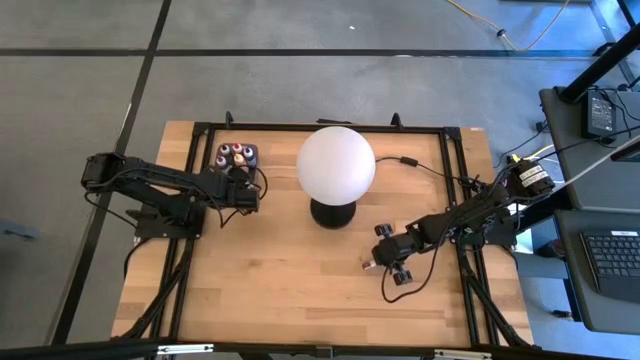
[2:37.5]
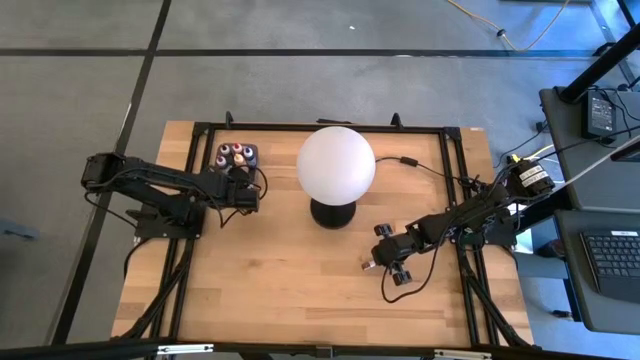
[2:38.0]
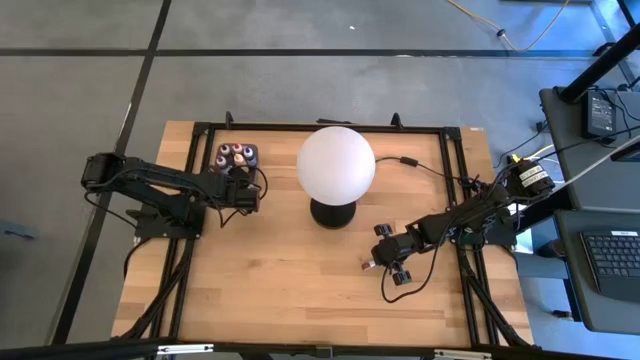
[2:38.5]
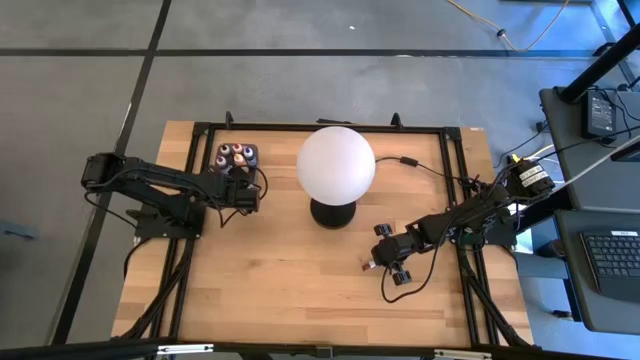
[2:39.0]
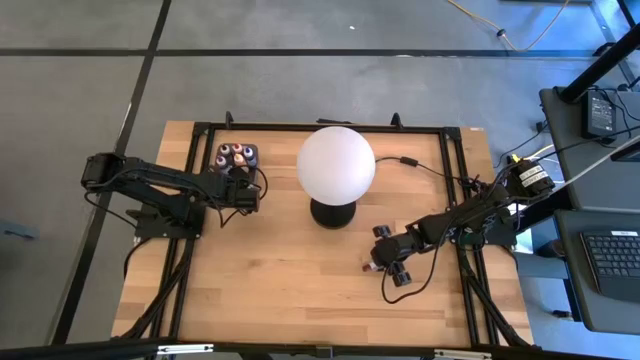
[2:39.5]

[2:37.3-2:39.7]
Task: Pick & Place food coloring
Put the small red food coloring bottle into the black container

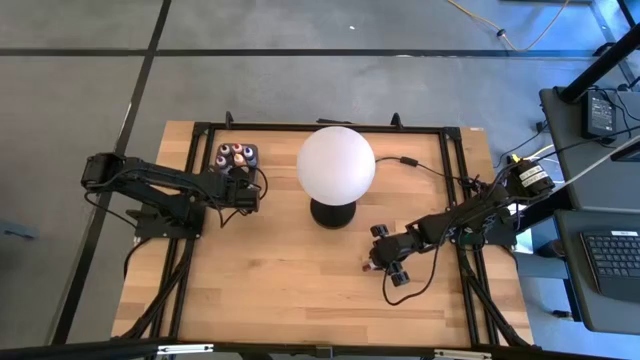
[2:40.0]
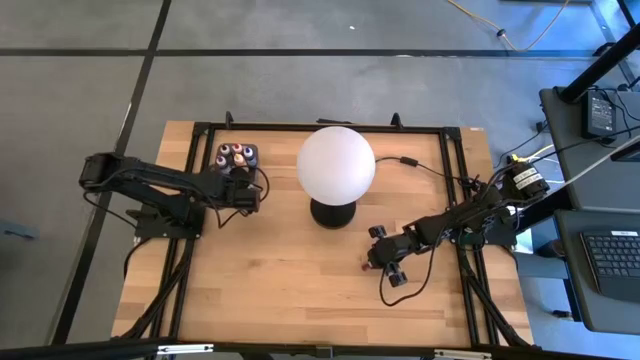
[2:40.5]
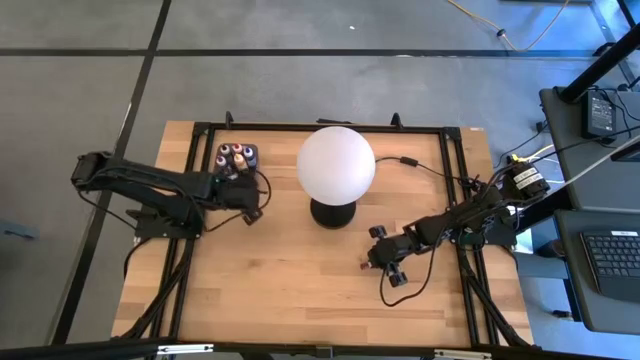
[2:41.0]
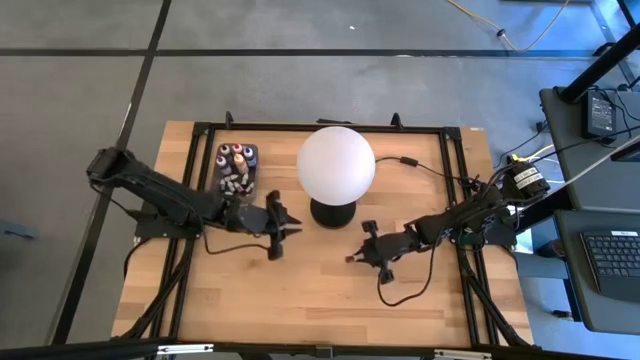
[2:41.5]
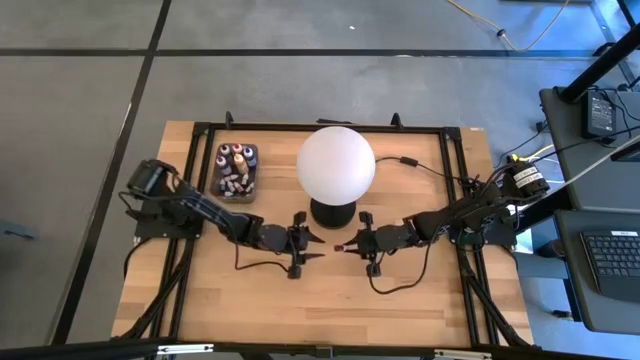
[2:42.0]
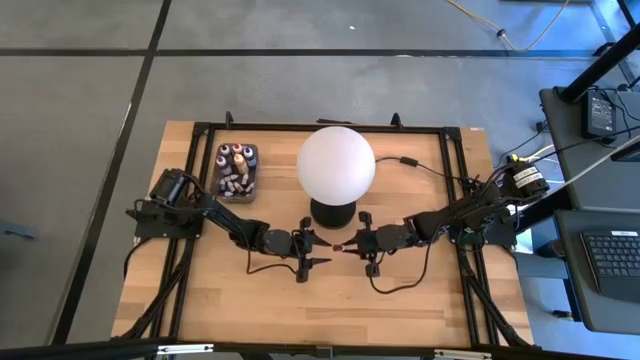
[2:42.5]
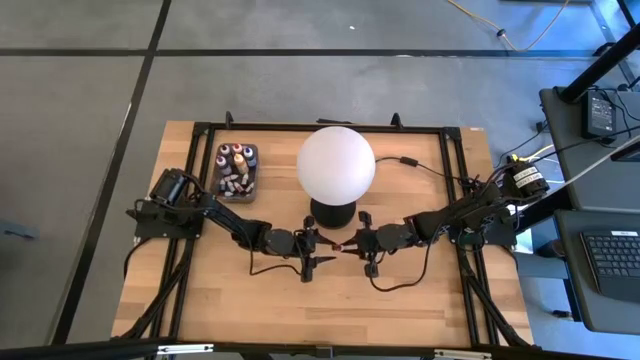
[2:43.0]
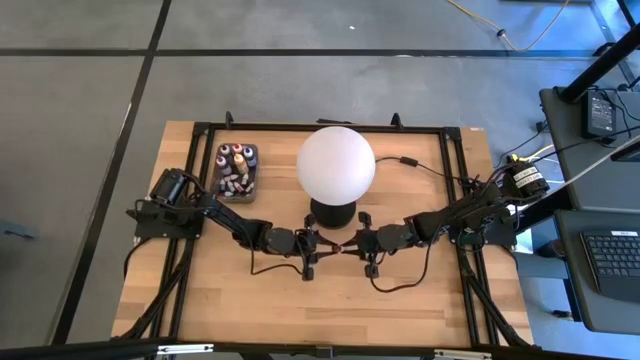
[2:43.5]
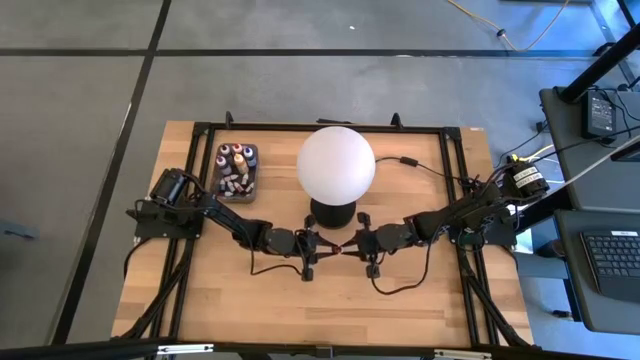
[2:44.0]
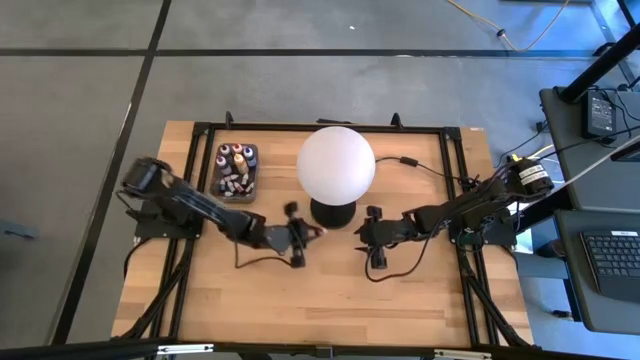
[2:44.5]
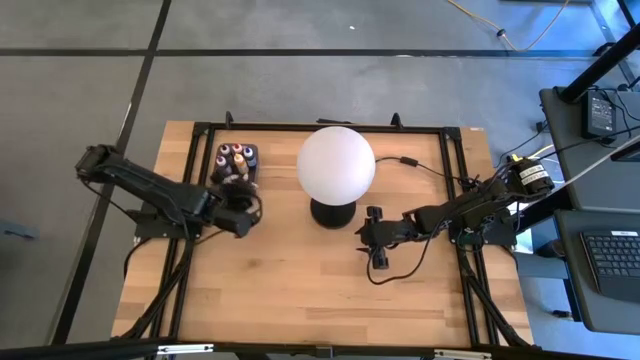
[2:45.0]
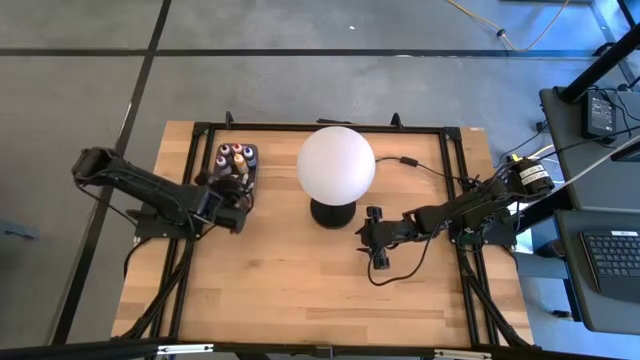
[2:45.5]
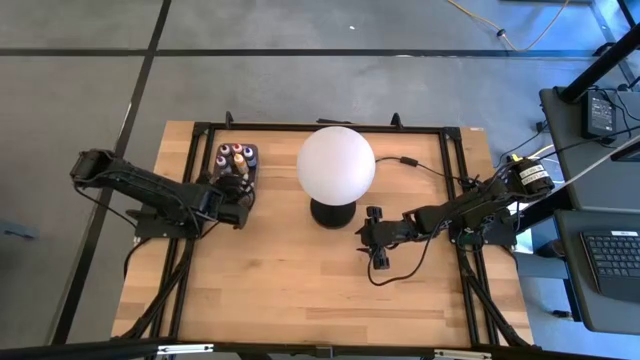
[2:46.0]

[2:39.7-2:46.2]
Put the small red food coloring bottle into the black container

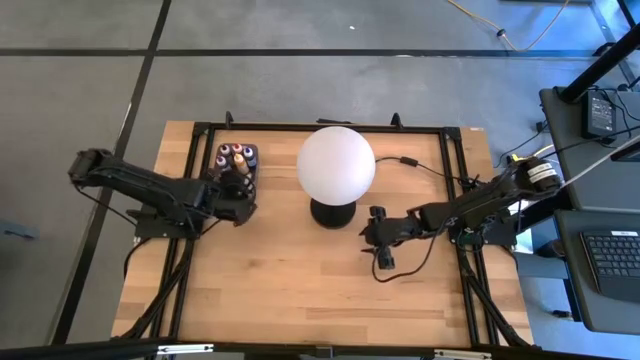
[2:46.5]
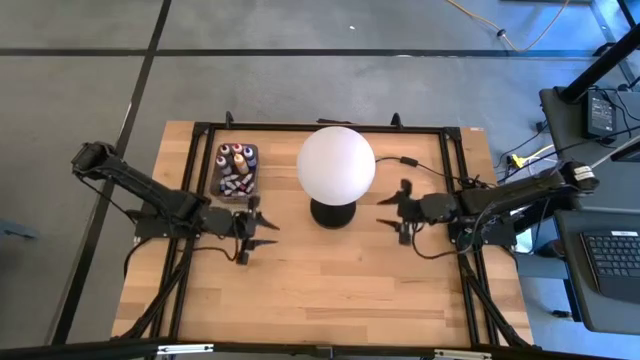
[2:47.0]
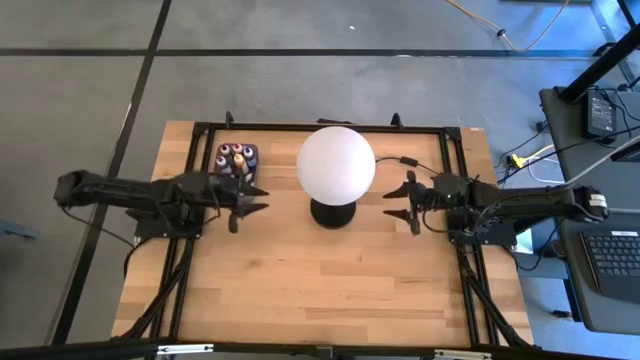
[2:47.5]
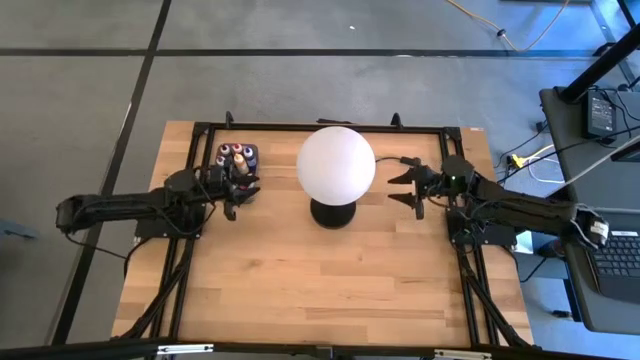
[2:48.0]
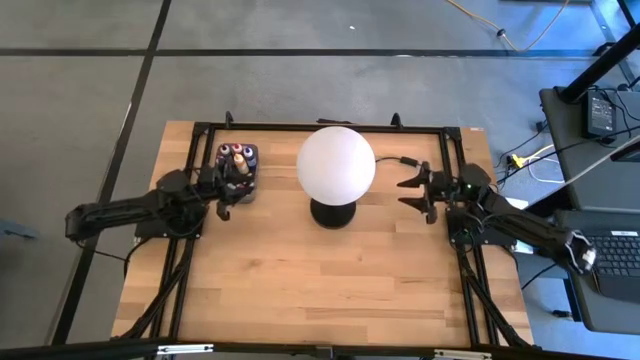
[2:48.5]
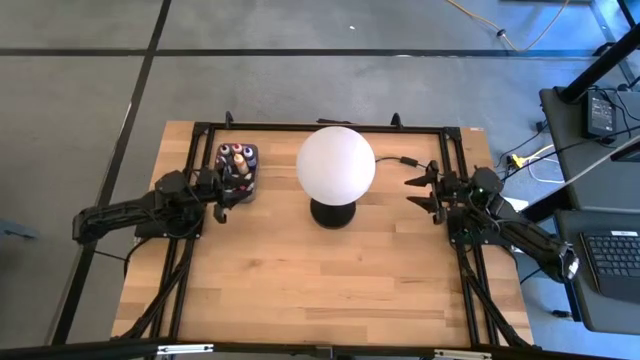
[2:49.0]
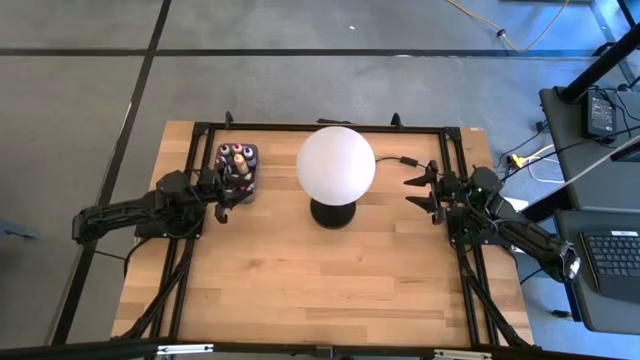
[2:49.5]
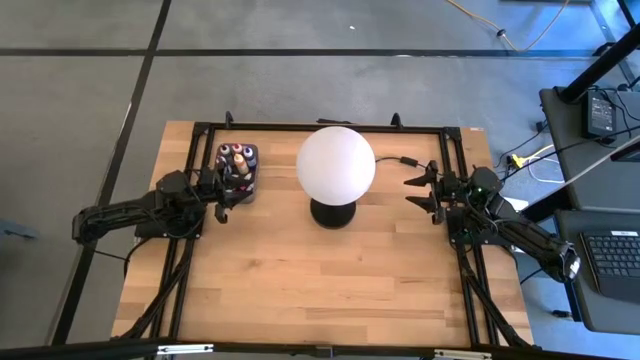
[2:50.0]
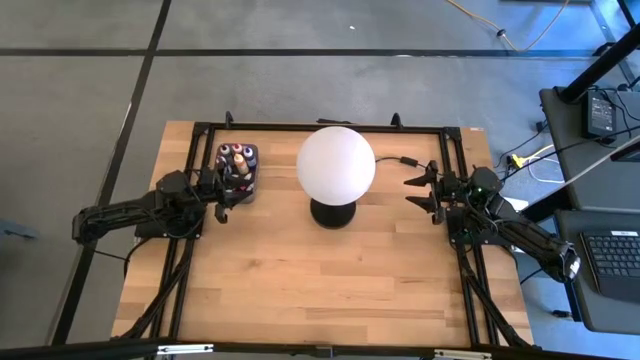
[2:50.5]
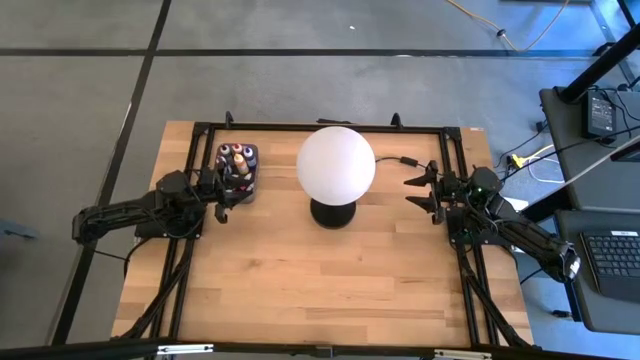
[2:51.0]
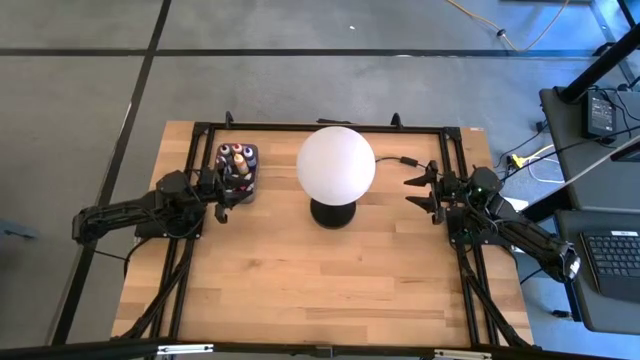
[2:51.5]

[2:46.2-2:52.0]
Return to Home Position

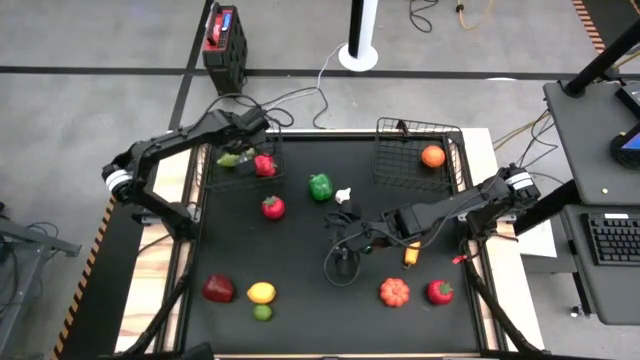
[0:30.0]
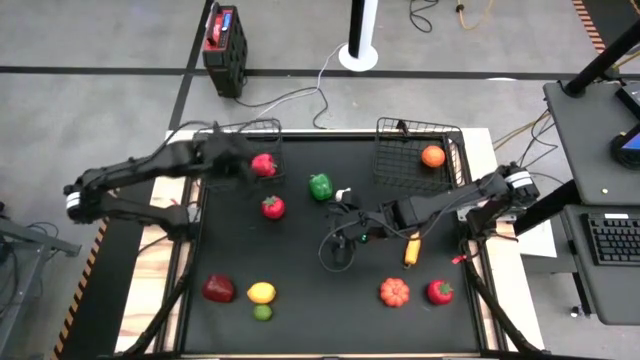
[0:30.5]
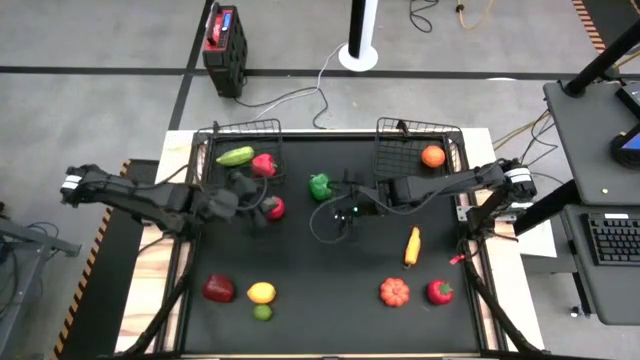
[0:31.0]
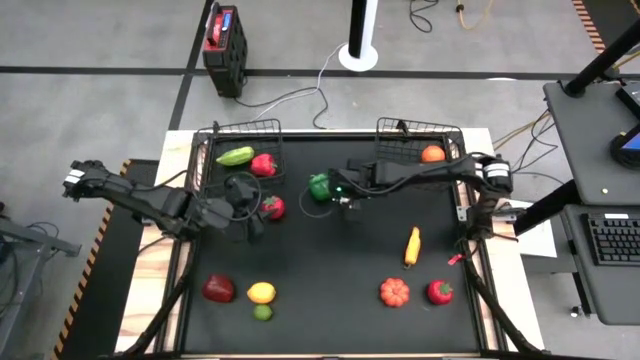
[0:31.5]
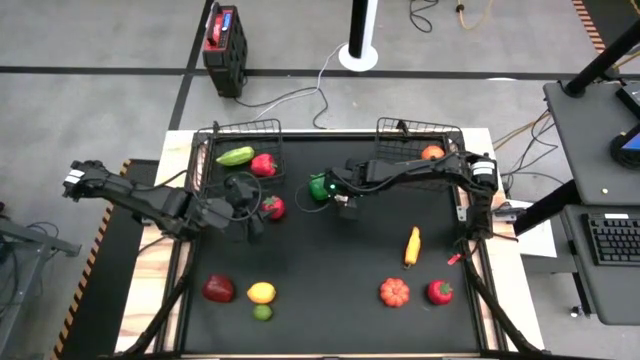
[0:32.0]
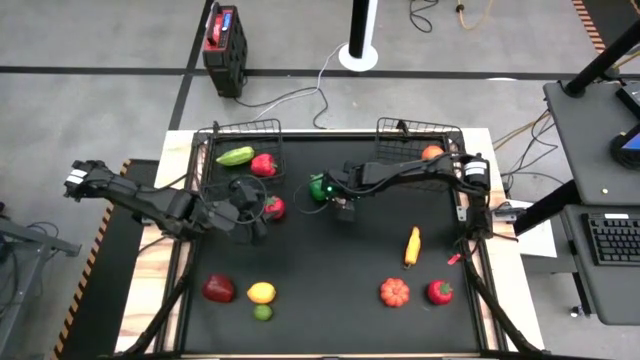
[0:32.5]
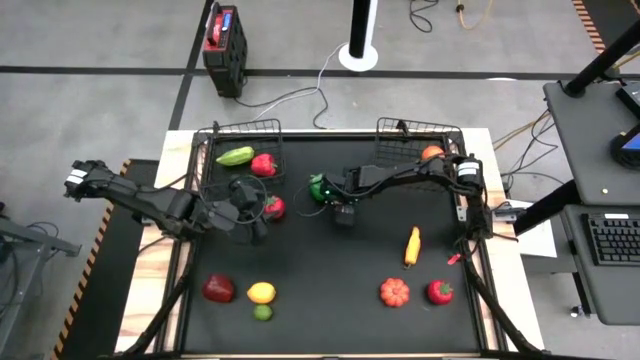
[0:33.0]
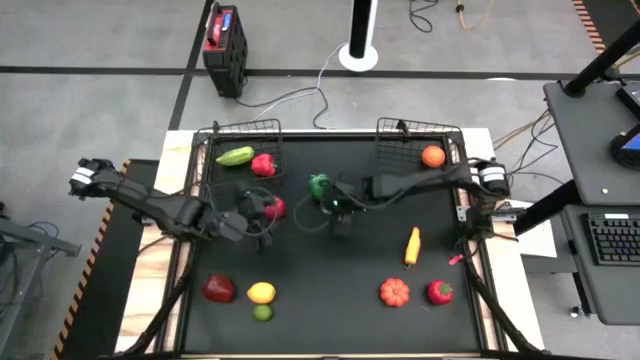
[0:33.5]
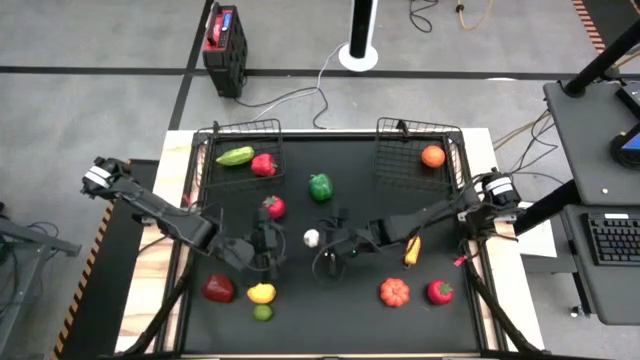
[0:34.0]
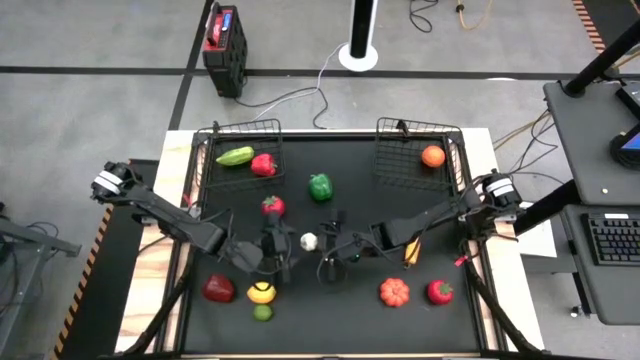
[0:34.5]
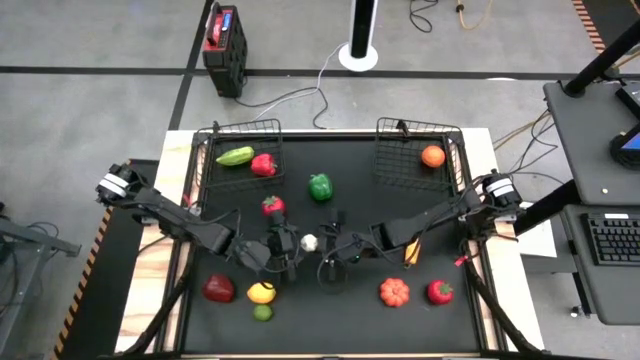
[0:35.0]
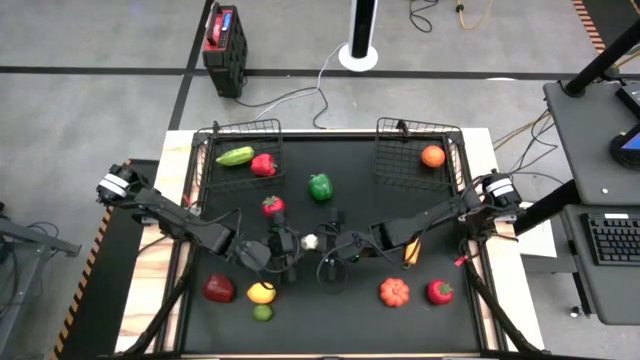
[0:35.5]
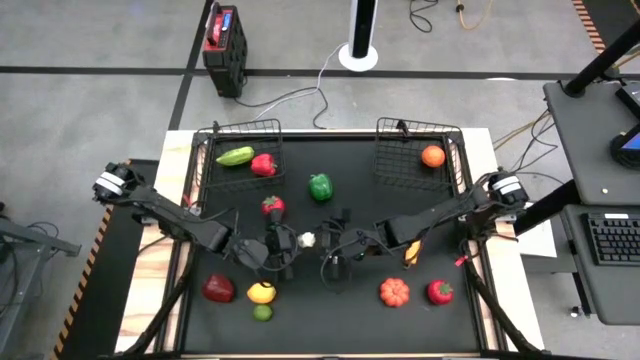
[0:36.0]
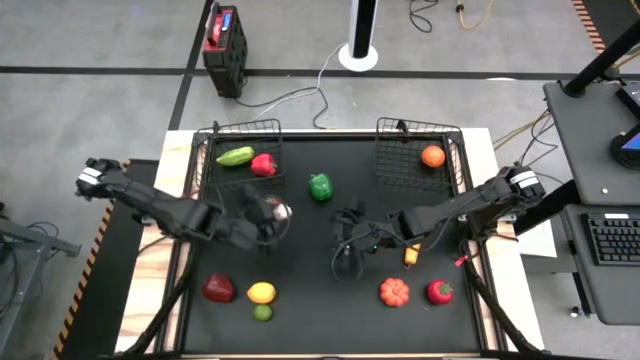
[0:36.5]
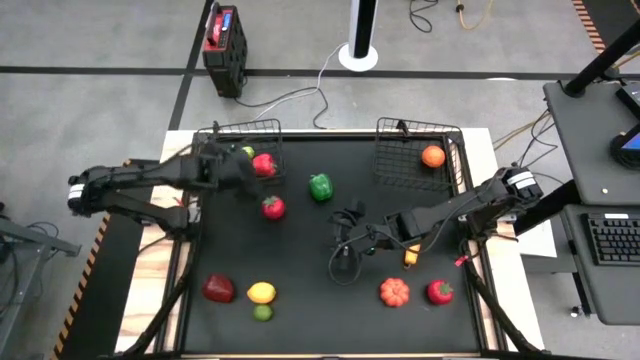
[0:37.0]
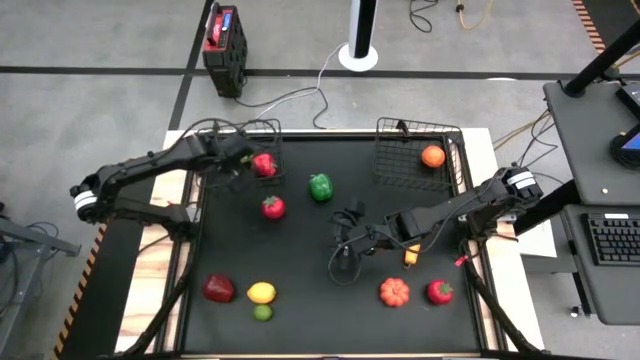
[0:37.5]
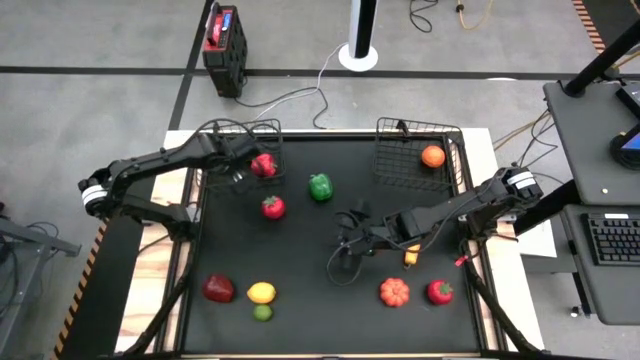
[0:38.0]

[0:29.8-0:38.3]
Task: Sort produce into baskets
Put the garlic into the left wire basket
